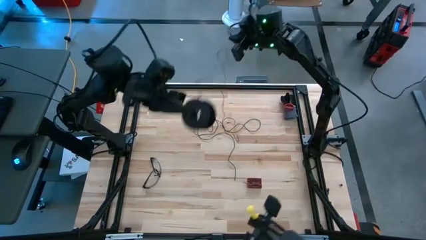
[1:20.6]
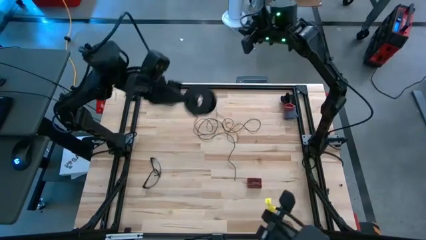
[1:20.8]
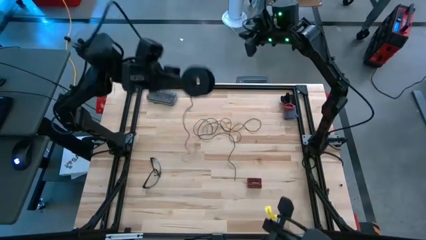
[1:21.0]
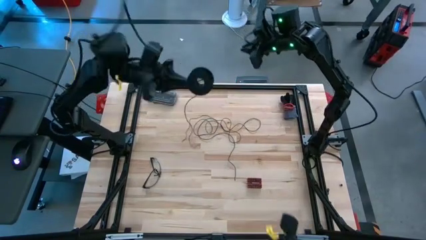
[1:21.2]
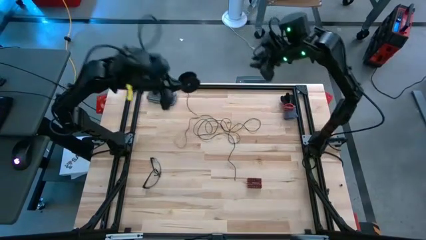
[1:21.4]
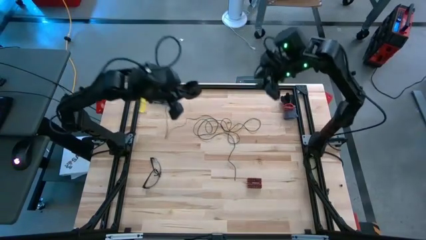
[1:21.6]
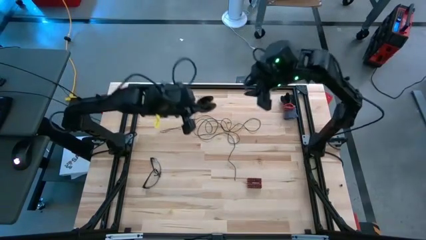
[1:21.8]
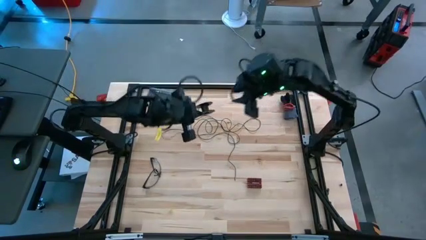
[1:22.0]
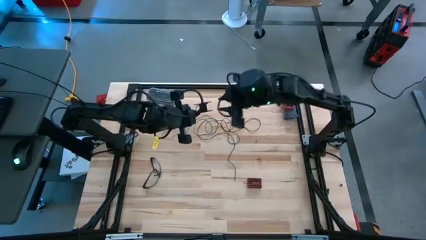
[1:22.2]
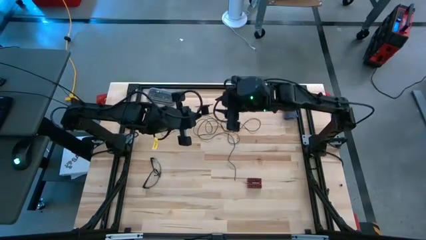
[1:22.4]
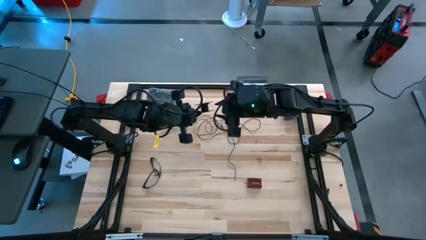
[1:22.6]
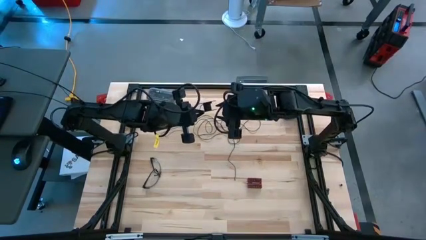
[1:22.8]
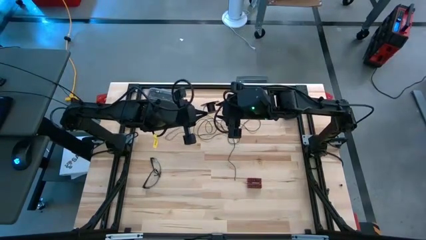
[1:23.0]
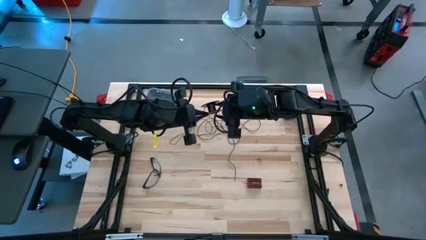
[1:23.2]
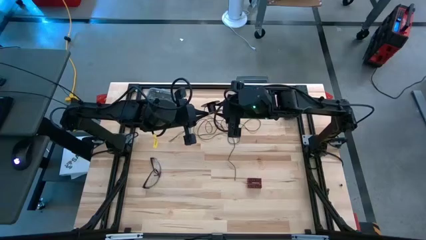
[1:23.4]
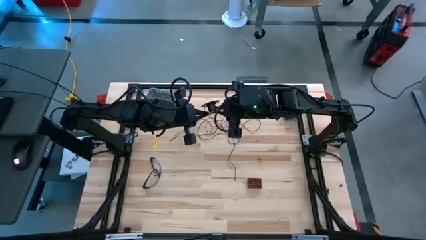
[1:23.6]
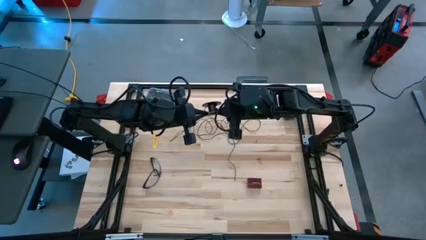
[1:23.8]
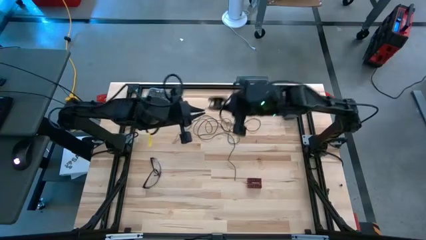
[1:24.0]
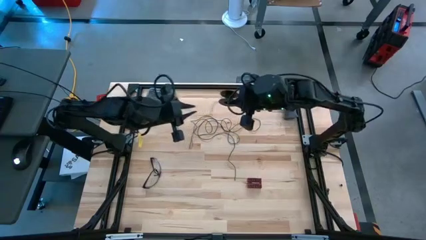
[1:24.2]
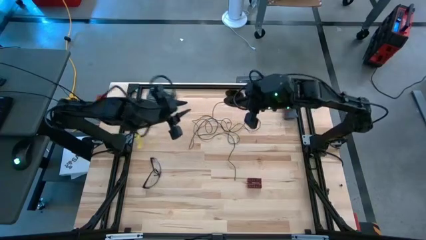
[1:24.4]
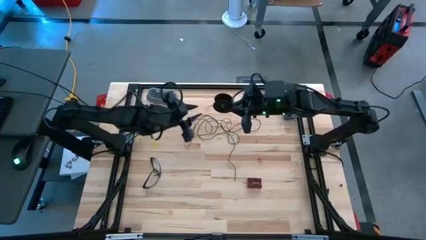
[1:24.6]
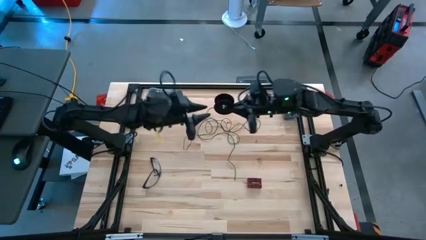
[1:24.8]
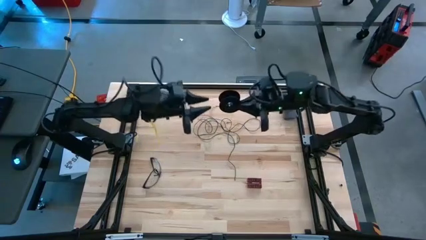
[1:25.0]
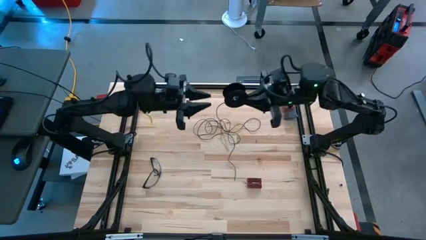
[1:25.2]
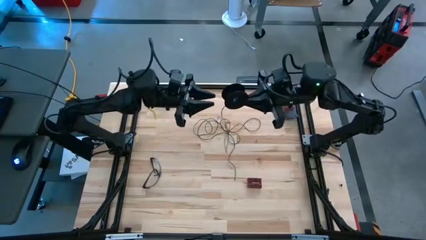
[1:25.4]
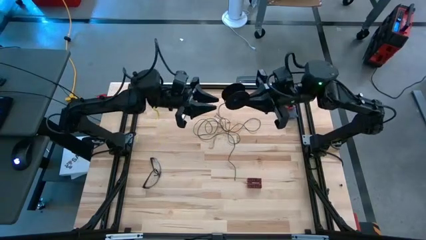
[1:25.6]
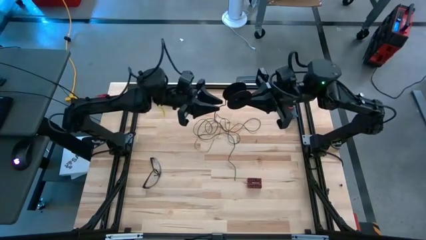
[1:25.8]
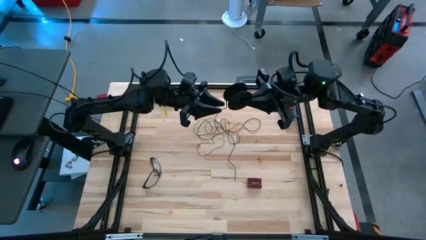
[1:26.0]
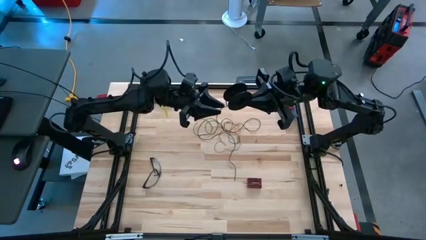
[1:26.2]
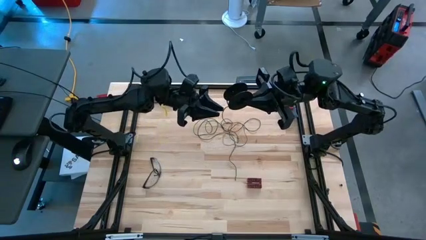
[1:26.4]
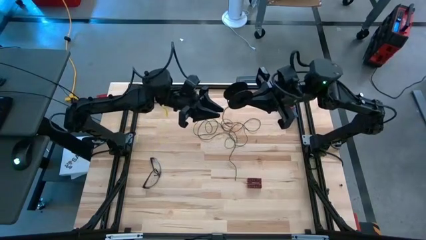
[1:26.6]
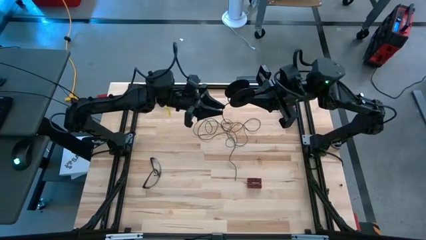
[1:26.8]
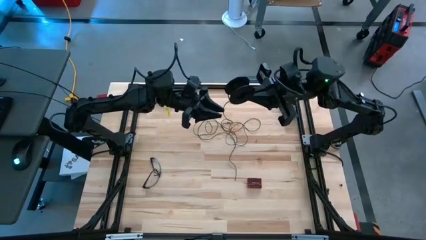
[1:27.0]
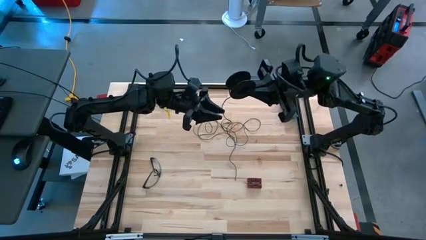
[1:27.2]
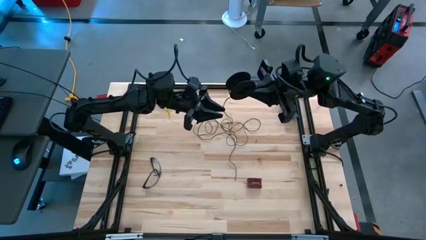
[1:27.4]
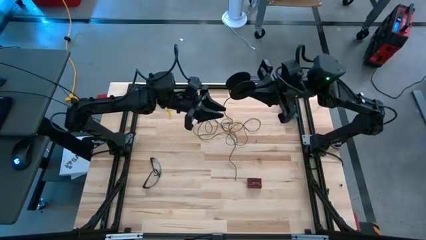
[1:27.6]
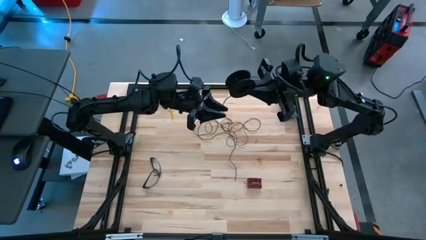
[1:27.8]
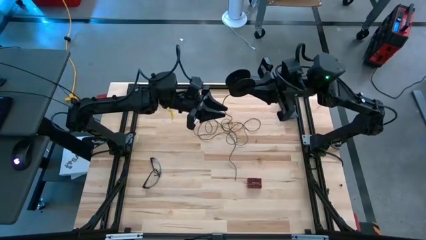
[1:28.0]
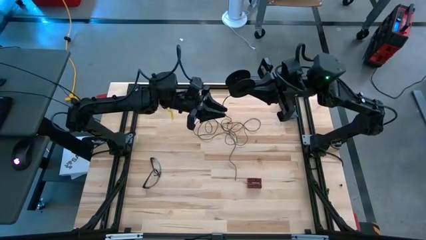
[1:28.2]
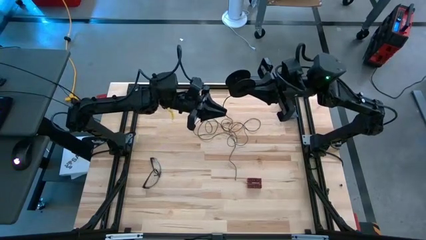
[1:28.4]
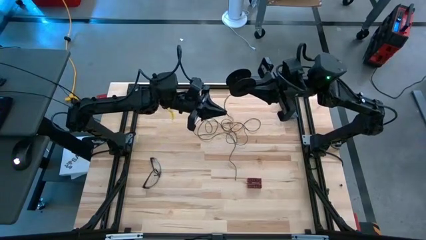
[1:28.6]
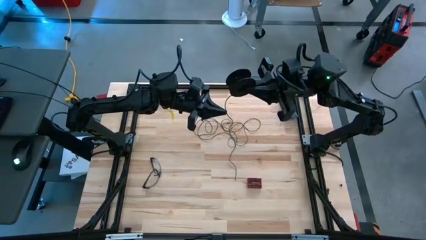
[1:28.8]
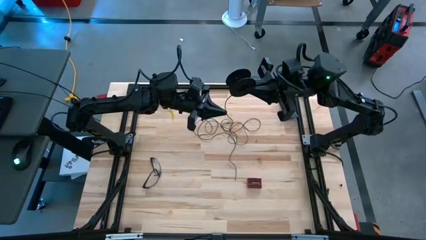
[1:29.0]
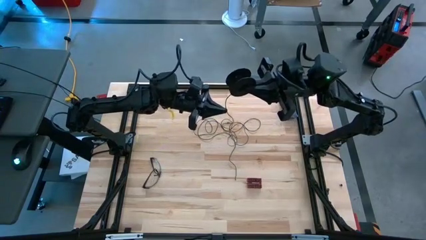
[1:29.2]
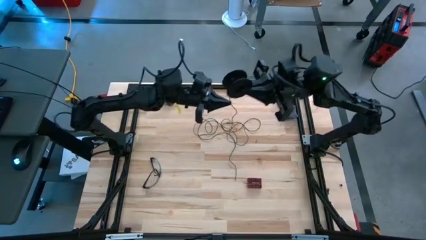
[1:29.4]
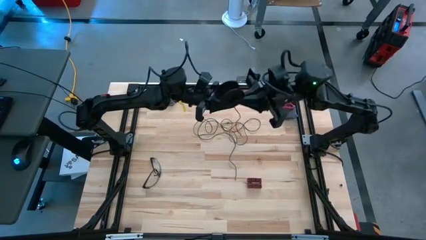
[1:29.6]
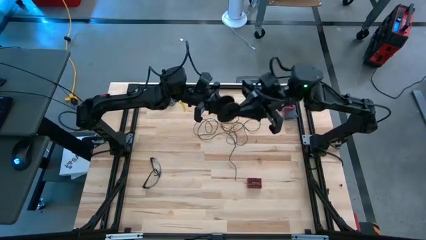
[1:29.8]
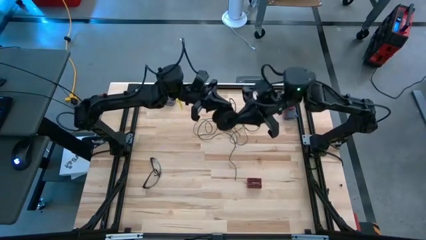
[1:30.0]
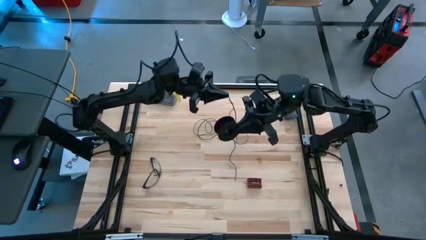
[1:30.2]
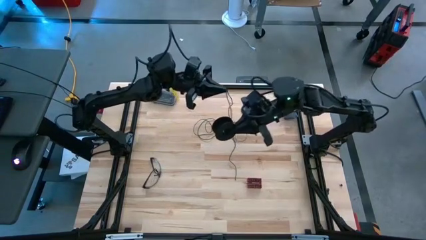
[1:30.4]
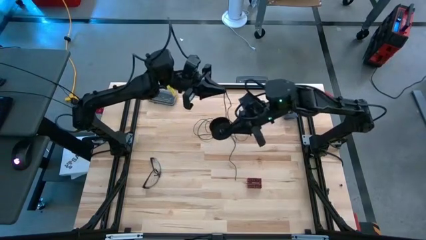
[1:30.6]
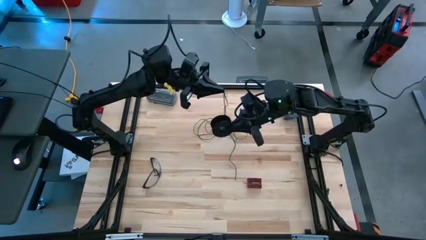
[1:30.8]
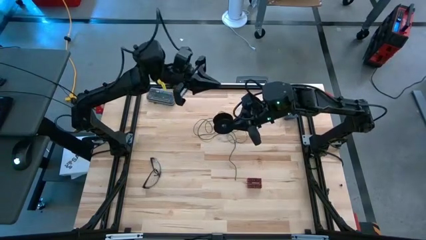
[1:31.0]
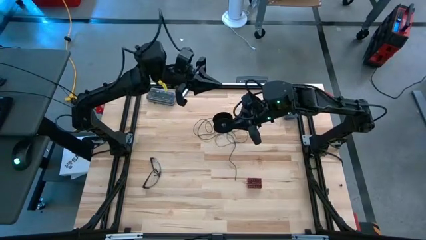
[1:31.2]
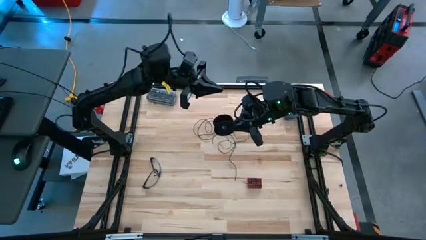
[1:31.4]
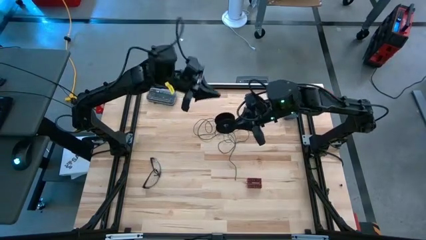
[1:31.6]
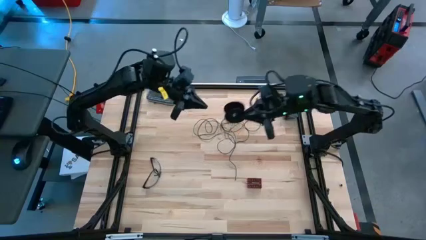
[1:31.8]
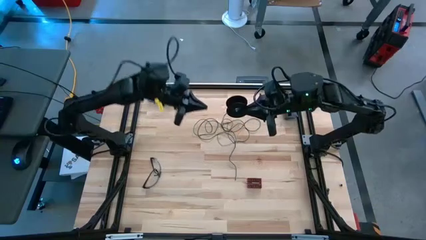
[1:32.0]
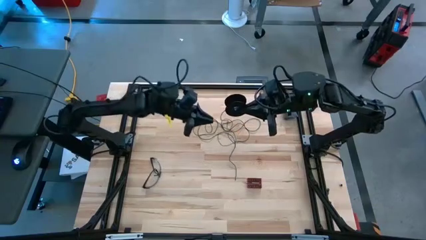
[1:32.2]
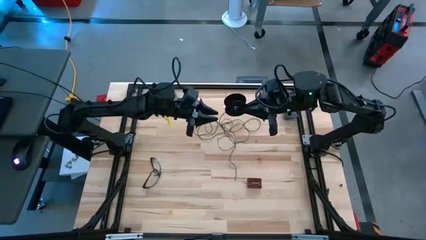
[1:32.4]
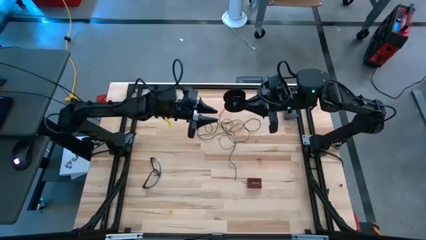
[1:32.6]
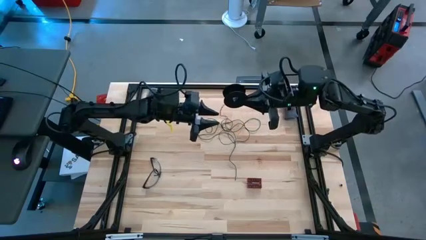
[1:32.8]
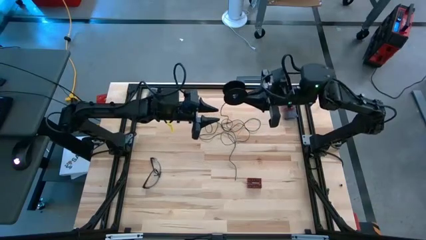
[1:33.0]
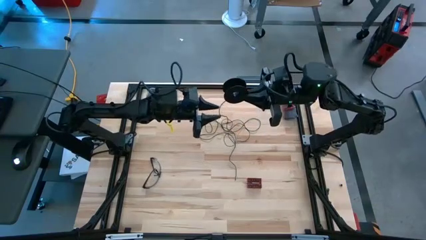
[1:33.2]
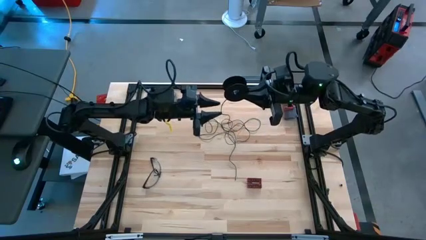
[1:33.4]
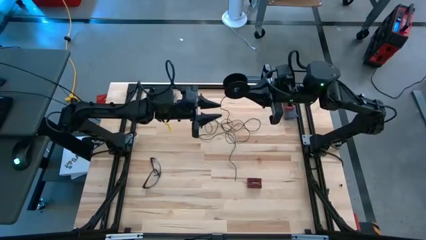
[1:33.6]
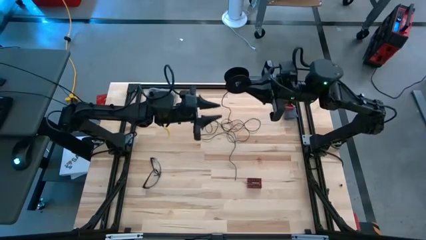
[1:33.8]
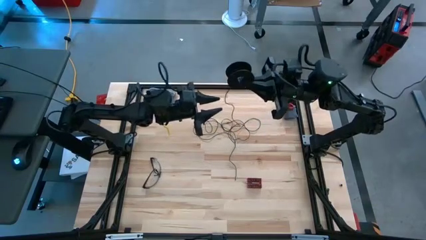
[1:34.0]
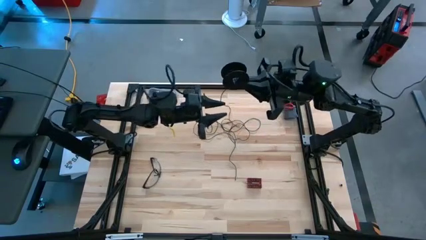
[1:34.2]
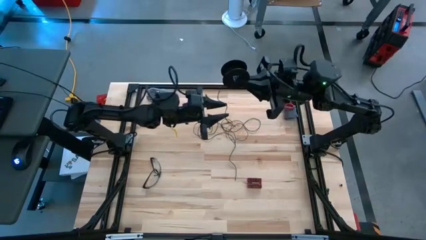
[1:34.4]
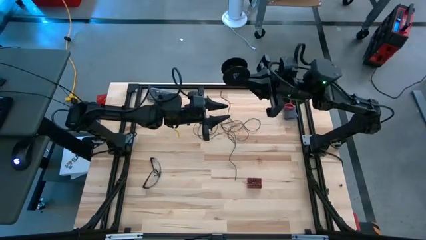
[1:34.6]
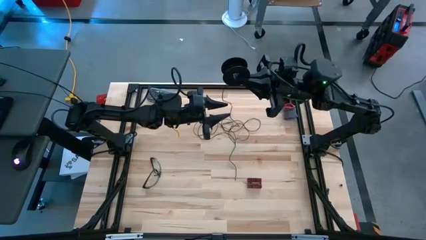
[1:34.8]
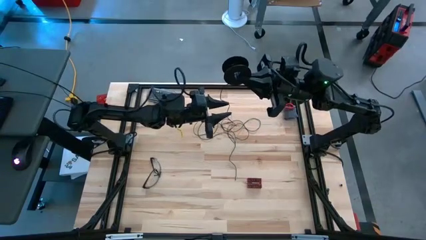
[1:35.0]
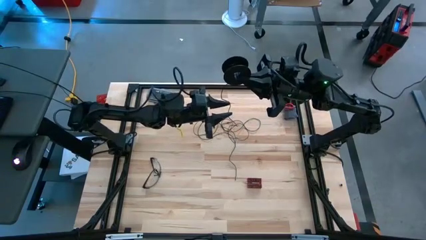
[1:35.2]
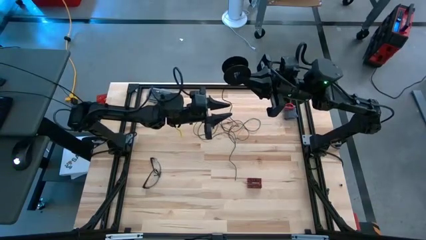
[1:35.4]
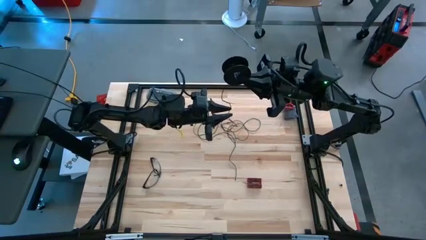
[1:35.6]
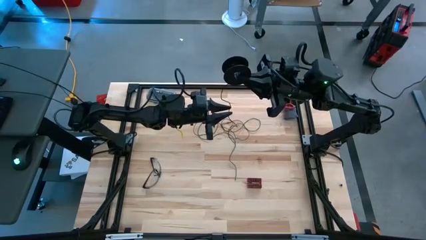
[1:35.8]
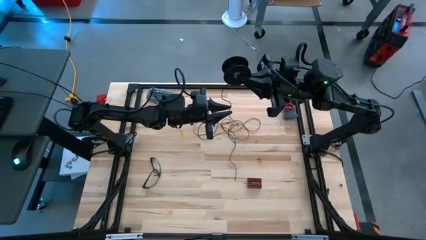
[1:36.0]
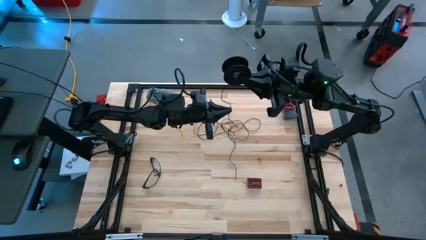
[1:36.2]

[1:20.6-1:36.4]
Task: Coil cords
Coil the black wire into the spool
